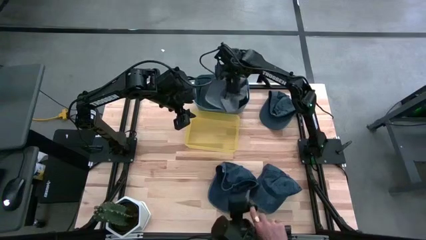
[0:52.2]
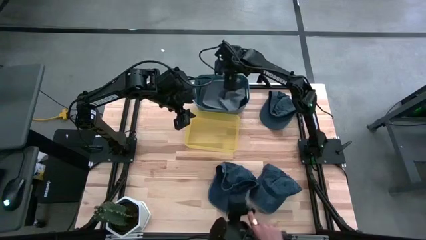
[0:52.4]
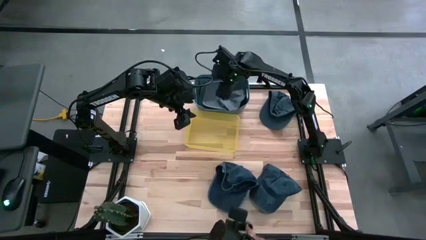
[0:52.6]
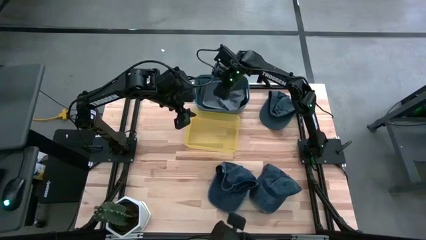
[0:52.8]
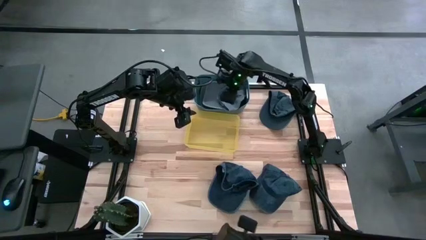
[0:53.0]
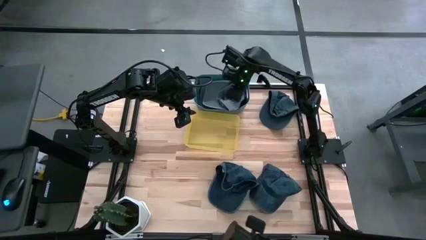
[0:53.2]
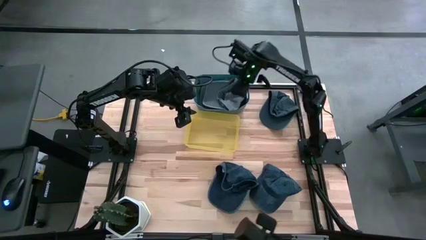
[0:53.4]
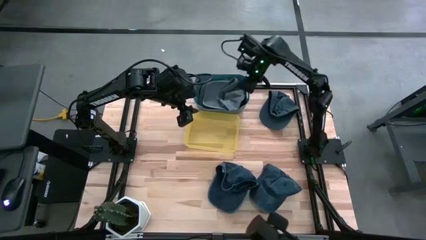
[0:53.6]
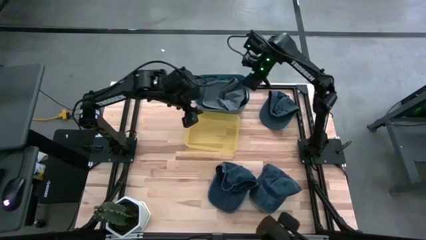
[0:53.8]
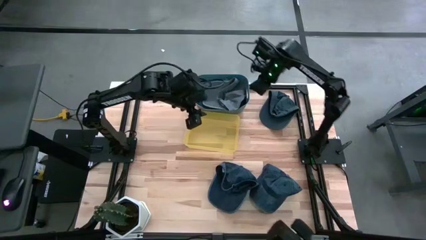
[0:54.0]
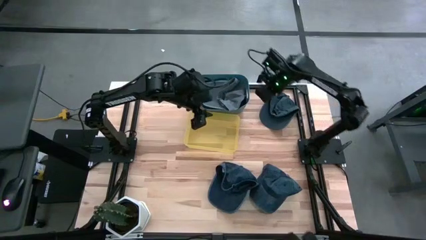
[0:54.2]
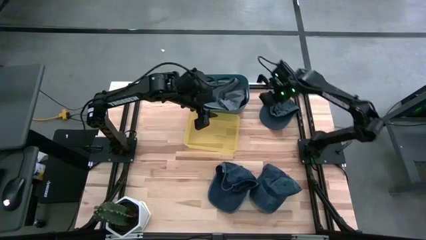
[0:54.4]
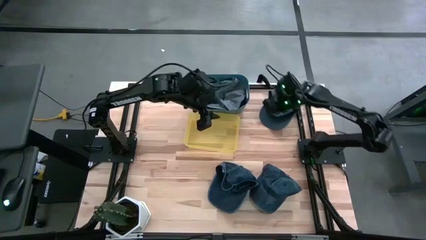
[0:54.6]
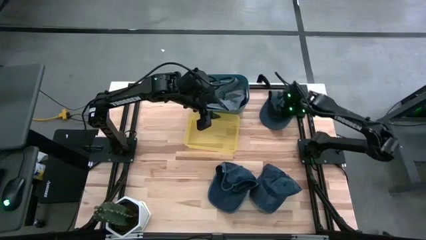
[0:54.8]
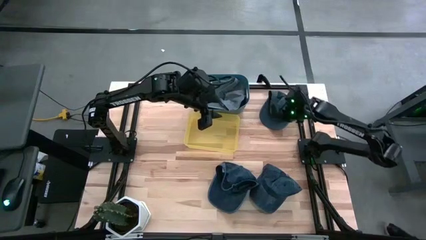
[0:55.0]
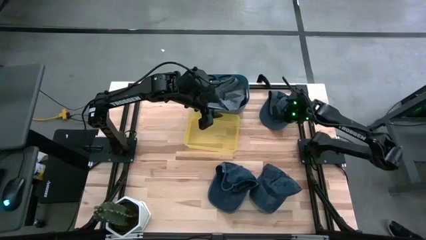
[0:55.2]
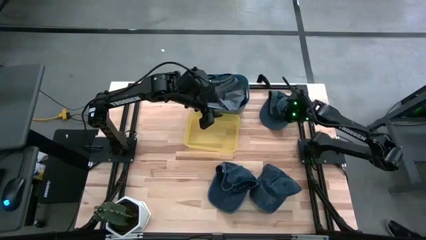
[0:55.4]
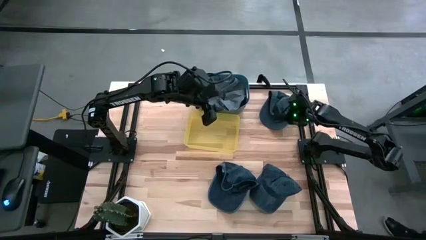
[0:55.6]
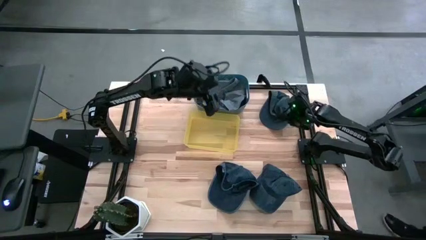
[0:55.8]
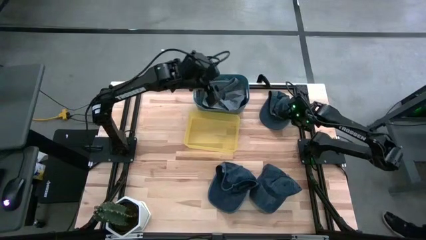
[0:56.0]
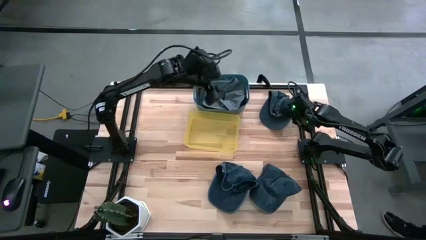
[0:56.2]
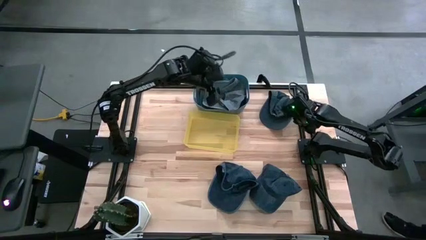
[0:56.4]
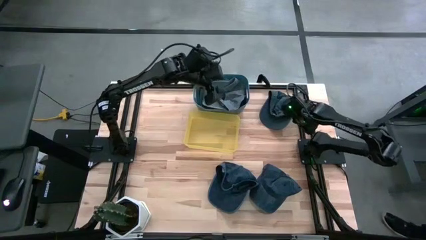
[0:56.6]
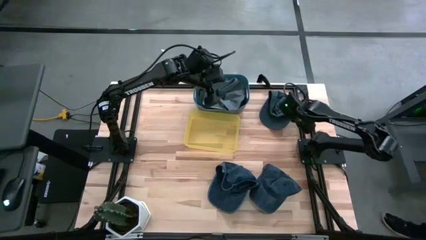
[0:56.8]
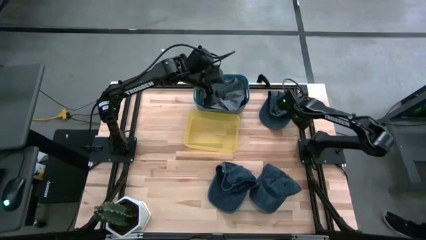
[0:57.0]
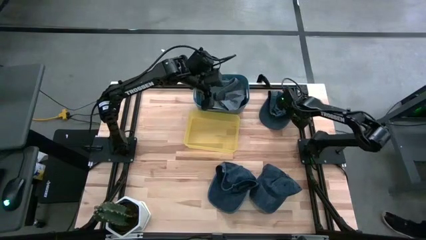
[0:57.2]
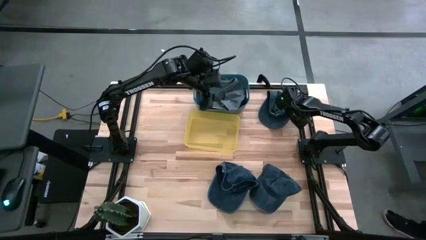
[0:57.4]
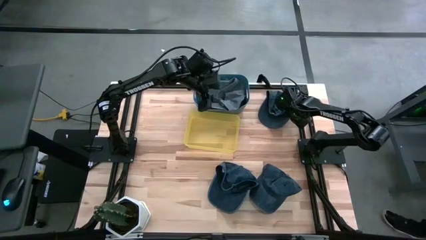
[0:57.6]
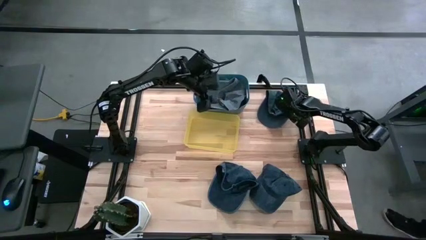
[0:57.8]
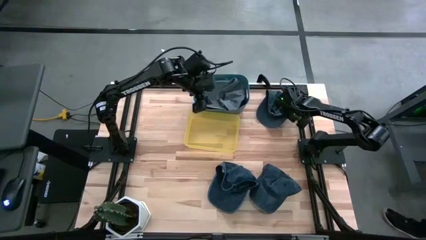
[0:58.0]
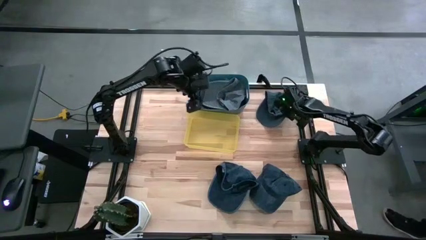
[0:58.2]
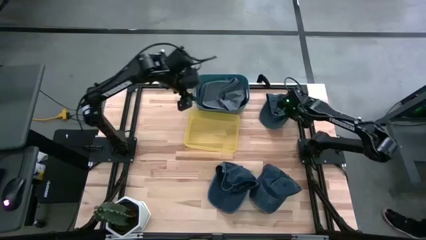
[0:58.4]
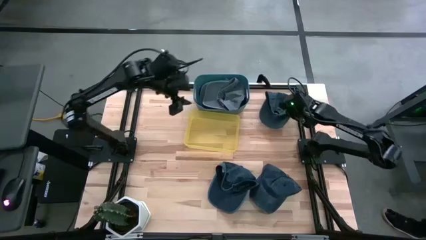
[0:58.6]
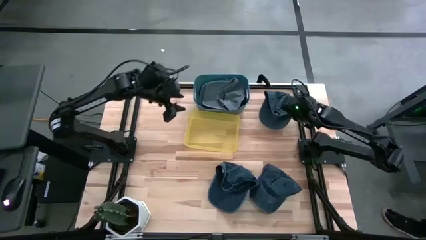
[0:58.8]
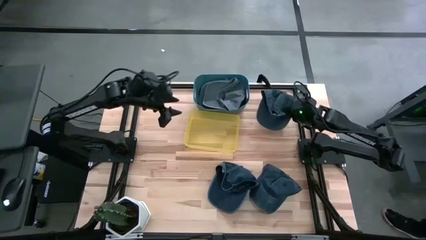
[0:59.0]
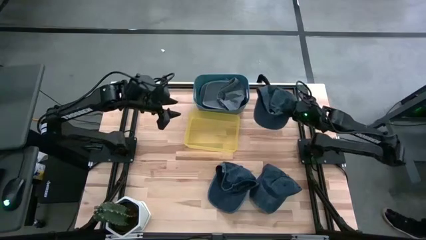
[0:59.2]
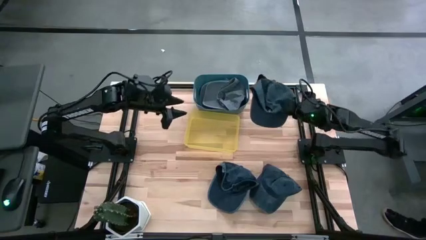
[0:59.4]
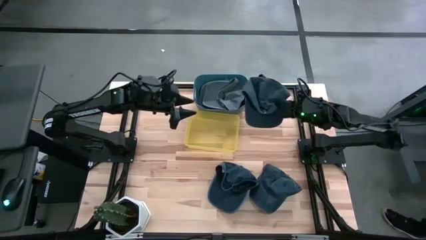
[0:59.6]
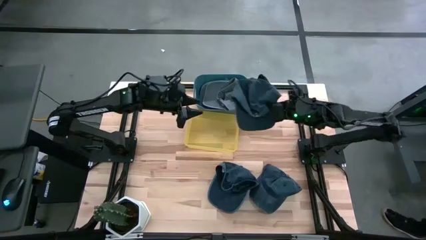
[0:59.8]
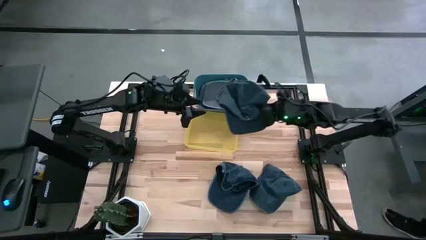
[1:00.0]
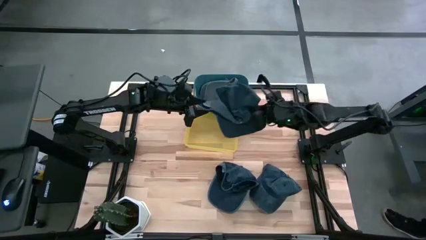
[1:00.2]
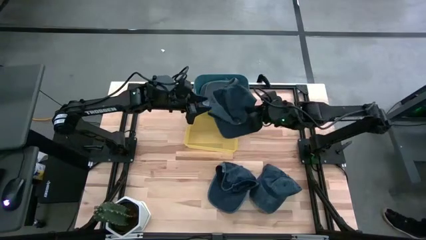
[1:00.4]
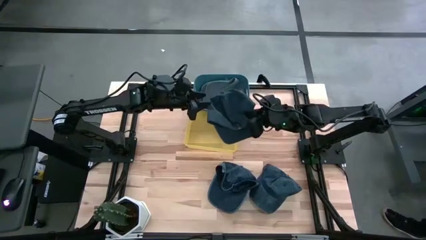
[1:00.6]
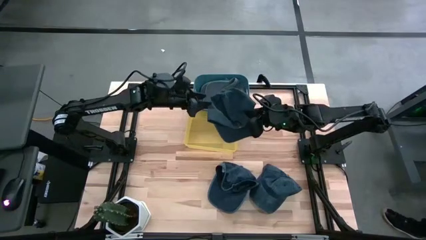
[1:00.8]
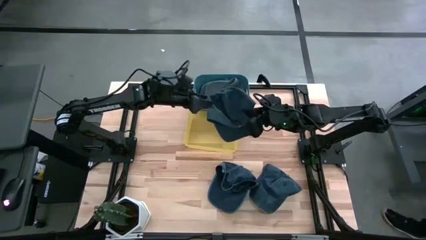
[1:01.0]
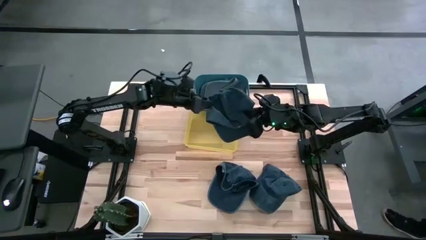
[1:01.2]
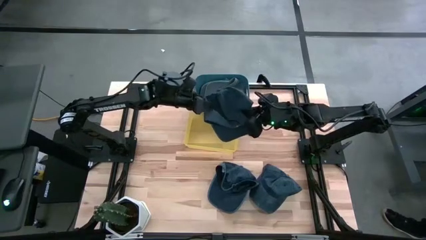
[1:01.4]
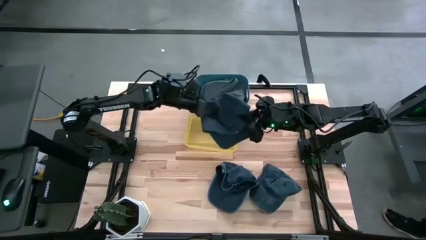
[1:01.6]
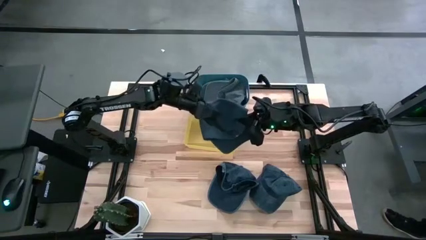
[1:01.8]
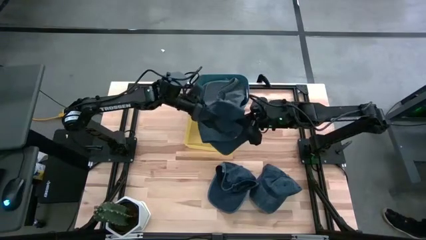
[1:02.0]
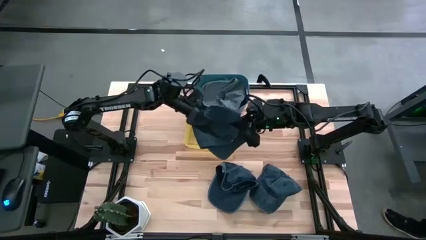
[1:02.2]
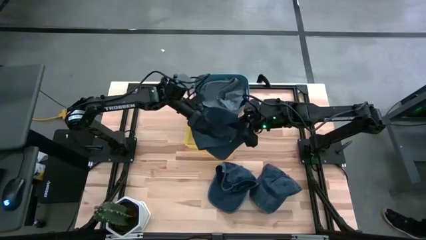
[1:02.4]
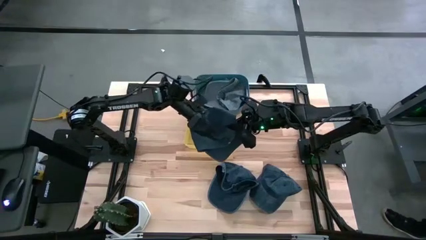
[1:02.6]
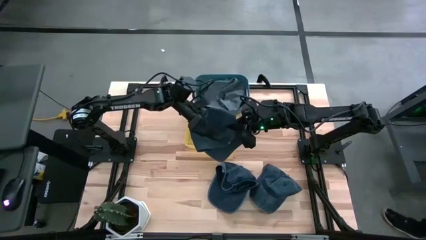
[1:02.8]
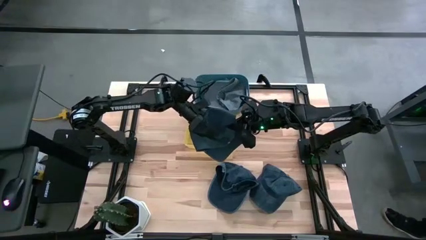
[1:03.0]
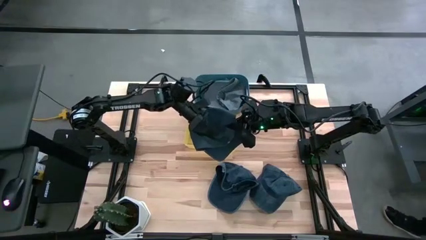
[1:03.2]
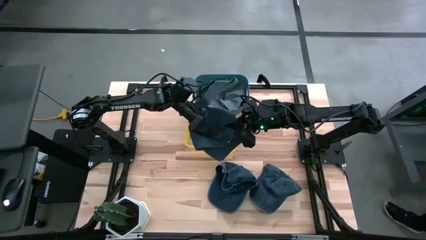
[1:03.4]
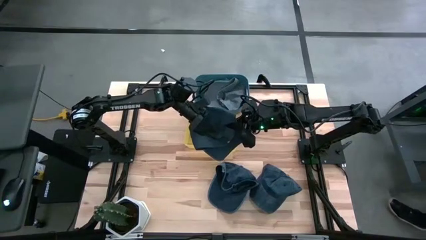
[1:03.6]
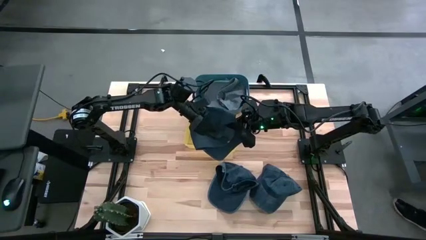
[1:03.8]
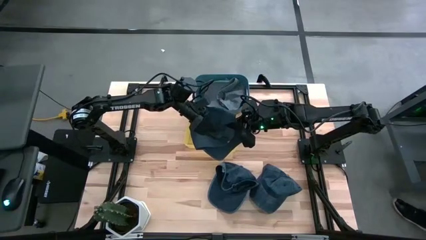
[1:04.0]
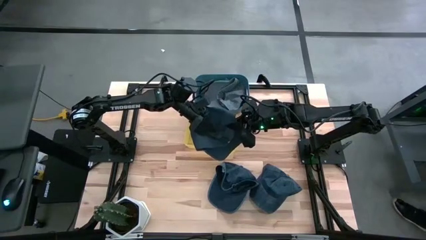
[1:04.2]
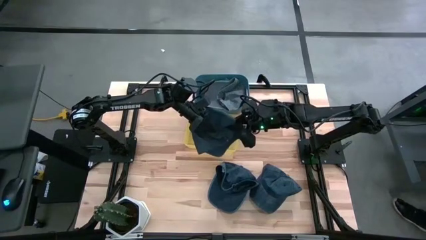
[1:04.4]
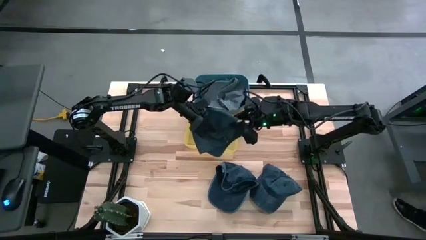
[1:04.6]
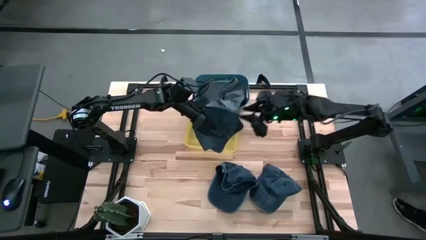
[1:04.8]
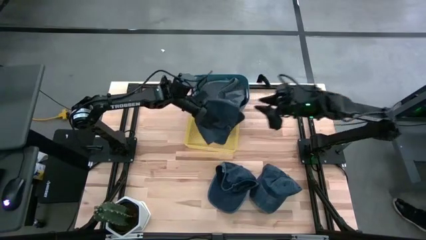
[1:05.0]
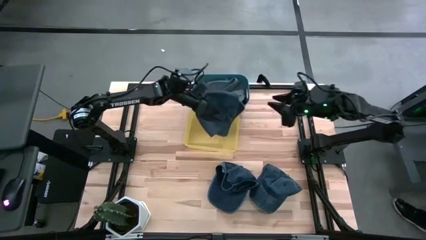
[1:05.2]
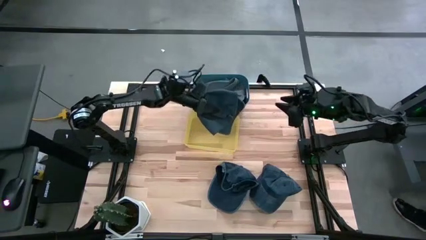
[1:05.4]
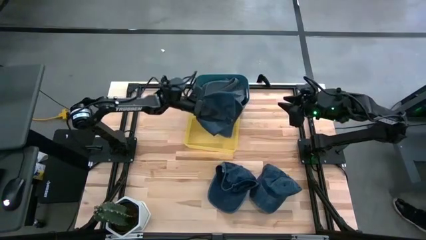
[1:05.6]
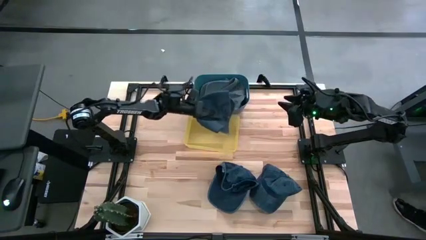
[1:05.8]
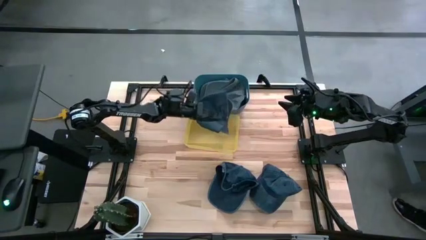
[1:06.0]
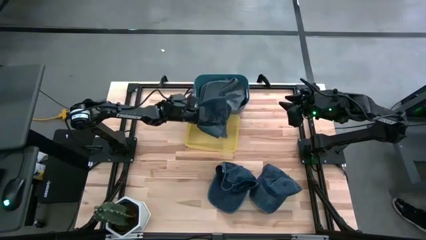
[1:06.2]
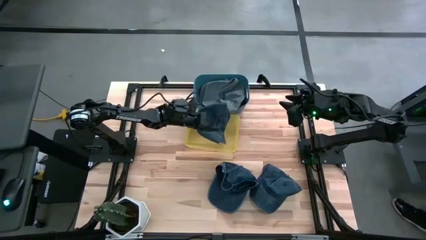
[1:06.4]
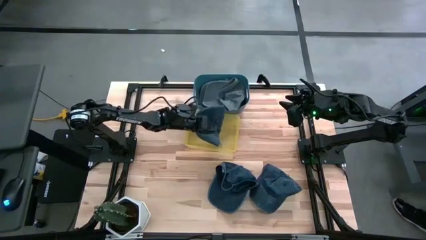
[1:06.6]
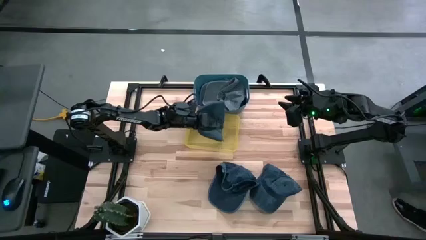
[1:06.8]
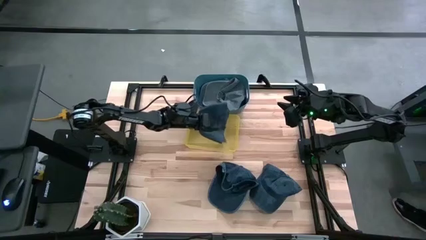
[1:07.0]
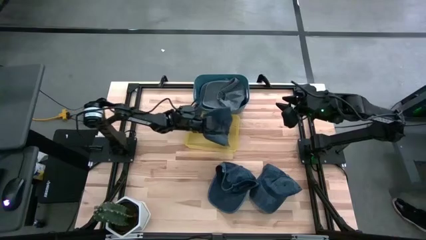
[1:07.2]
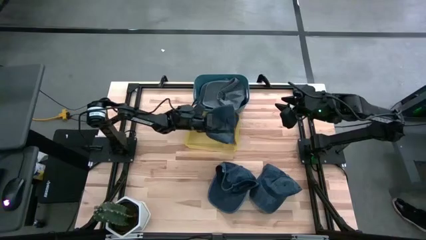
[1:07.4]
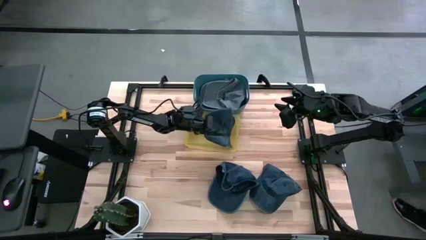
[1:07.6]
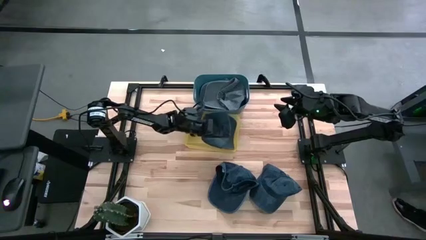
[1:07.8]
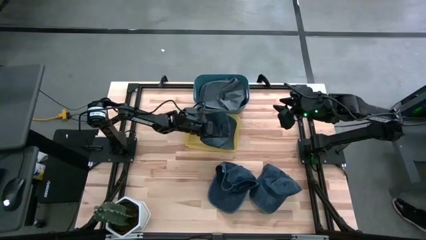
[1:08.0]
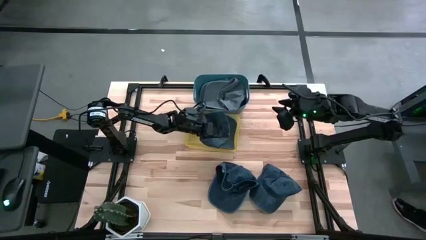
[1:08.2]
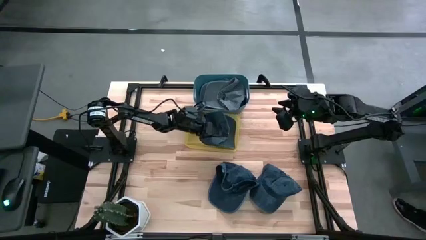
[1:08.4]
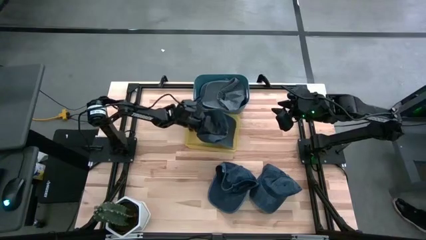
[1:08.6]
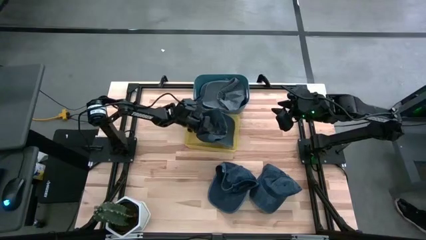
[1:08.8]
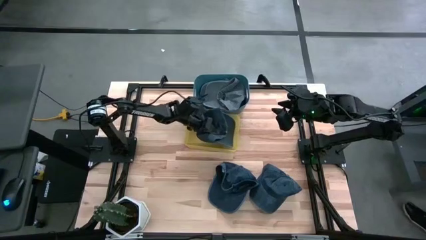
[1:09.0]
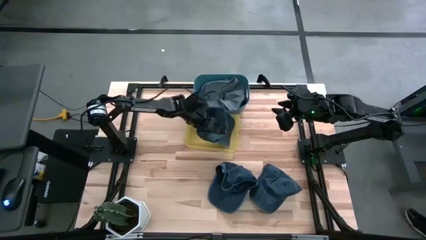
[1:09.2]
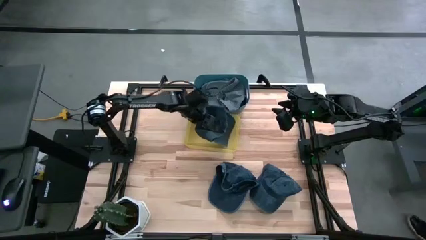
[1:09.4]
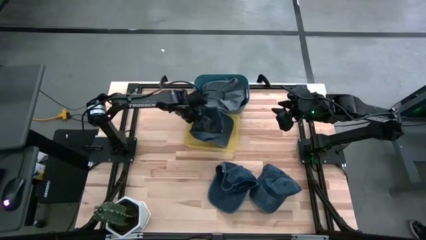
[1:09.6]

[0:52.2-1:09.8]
Task: Pick & Place hat
Put the top blue cap into the yellow bin
